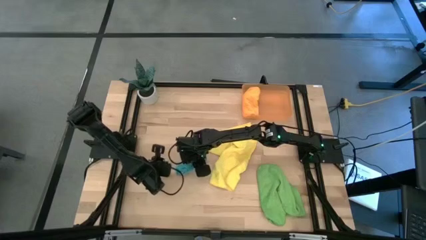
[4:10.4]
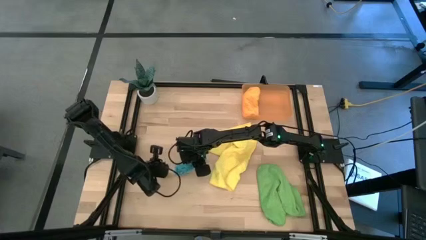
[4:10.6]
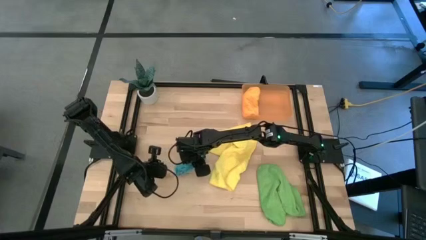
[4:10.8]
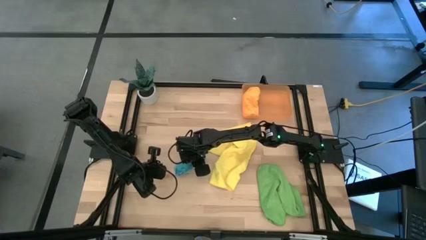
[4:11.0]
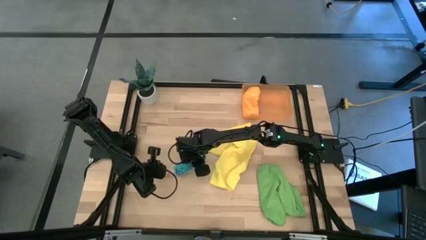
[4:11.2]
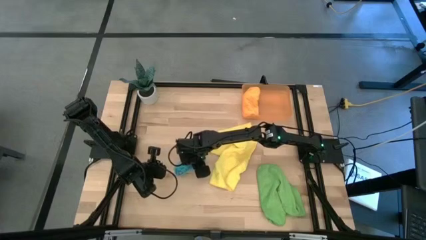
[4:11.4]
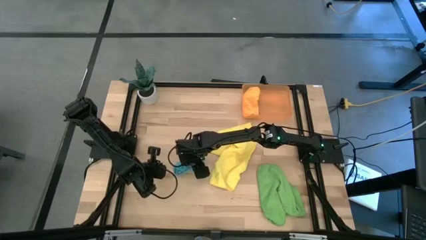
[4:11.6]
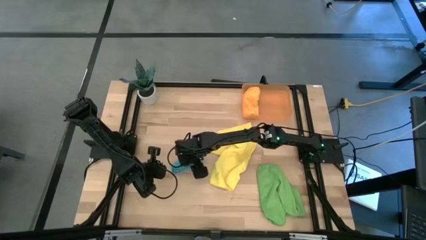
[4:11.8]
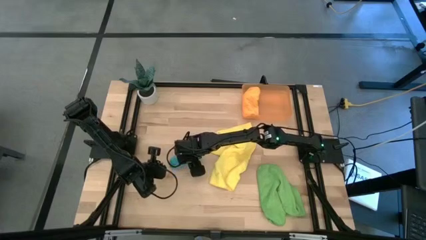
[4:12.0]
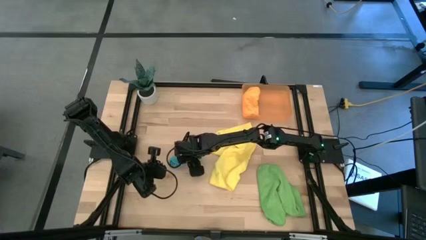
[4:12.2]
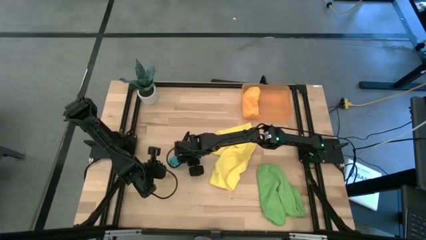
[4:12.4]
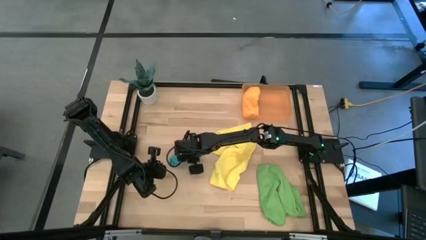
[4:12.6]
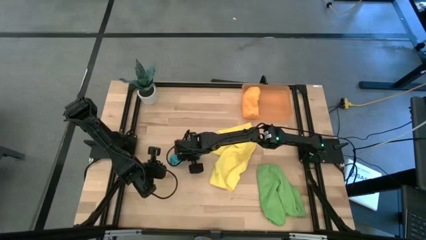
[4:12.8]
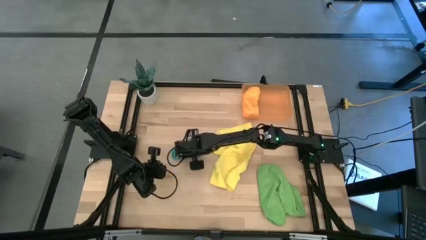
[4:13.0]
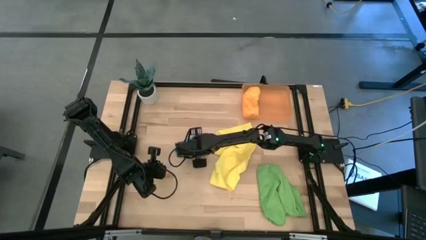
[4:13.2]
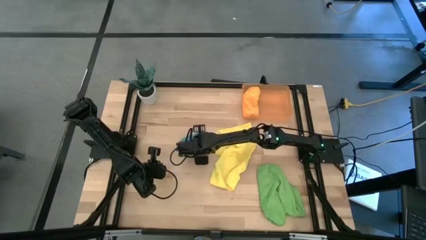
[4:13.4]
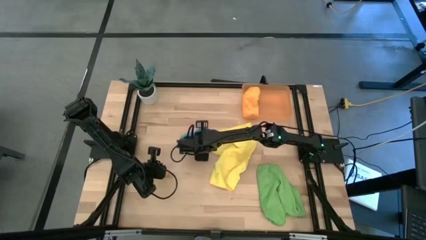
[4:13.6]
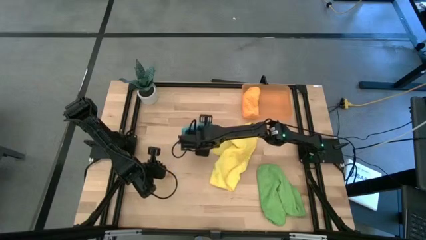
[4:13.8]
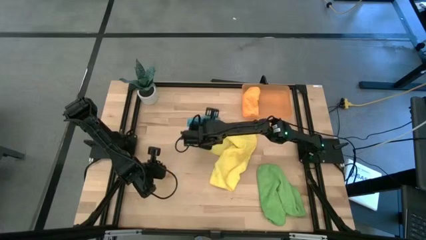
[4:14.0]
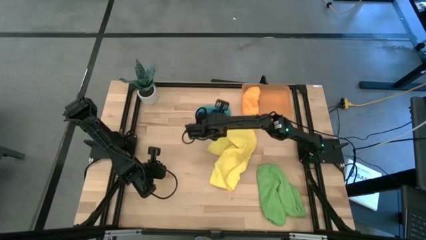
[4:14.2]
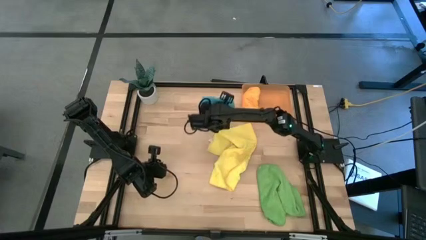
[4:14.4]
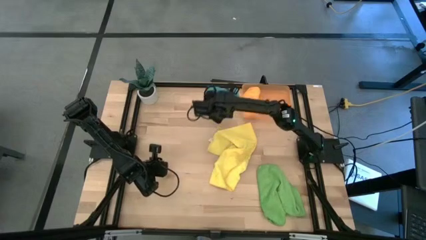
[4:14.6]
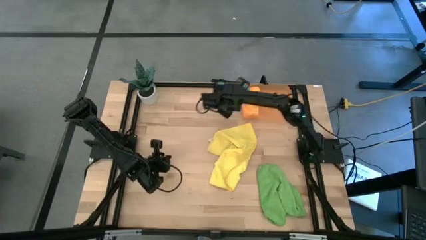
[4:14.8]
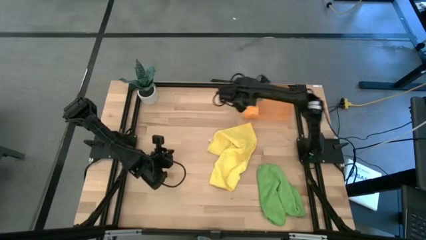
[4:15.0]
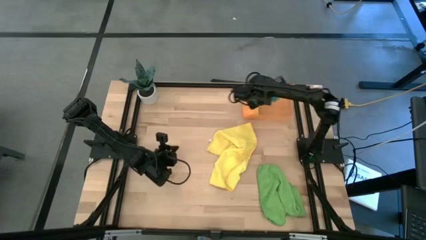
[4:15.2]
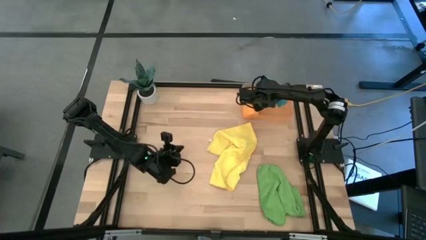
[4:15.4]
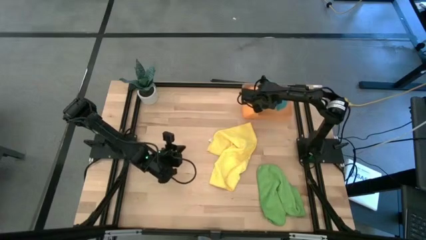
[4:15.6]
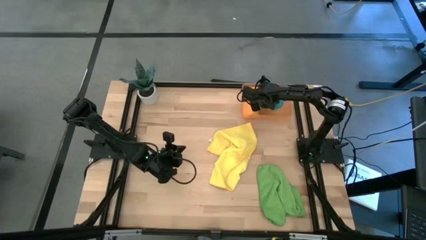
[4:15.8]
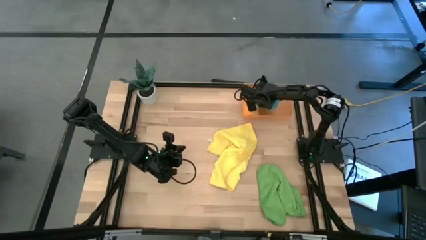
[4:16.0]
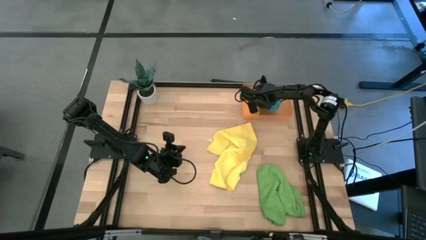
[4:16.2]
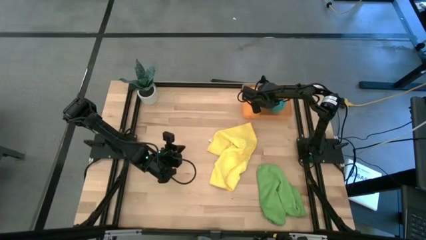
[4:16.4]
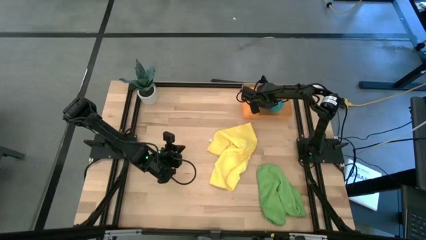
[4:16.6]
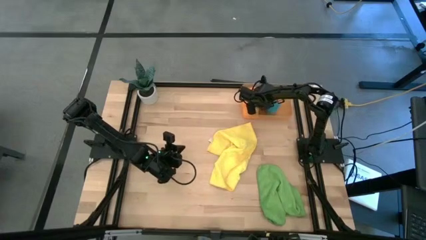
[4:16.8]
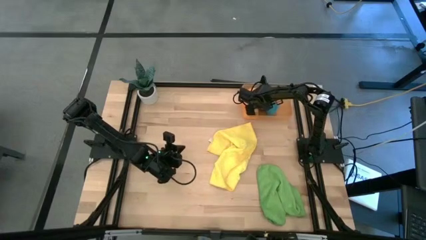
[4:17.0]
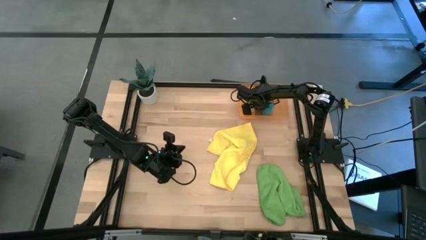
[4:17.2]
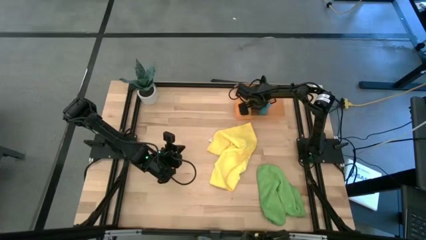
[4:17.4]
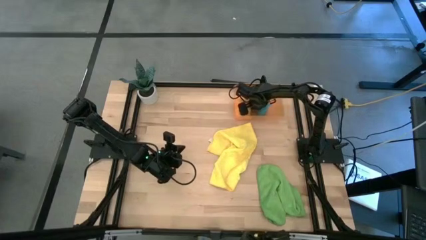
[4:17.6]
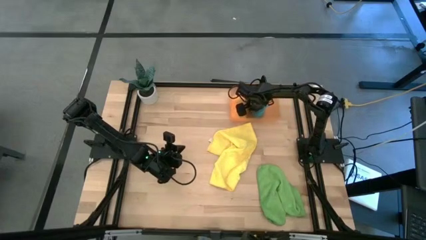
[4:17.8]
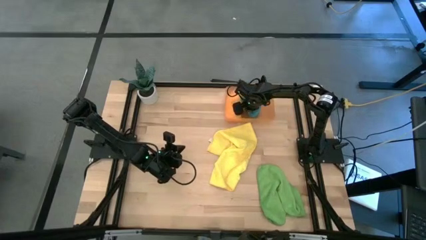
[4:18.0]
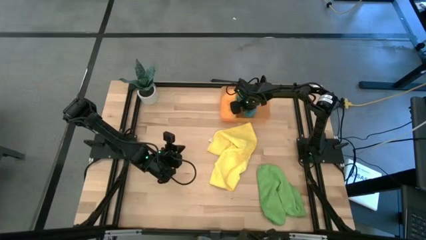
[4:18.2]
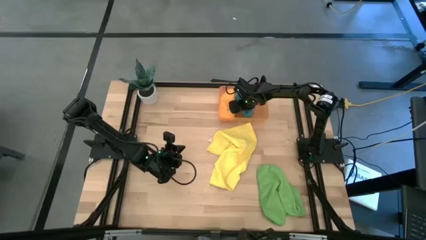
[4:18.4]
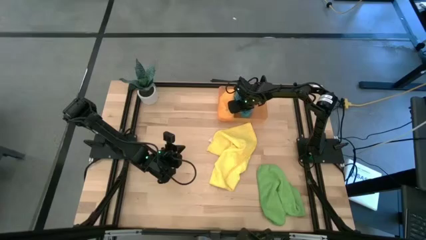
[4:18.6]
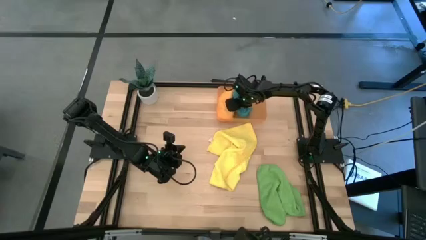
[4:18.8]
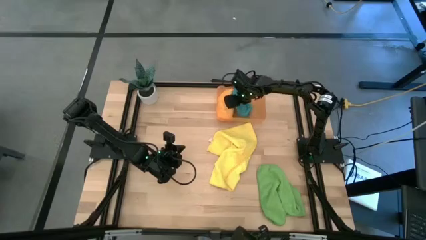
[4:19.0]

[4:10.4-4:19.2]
Task: Roll microfiber towels into tight, uniform cylinder then place into a basket
Put the blue microfiber towel into the bin

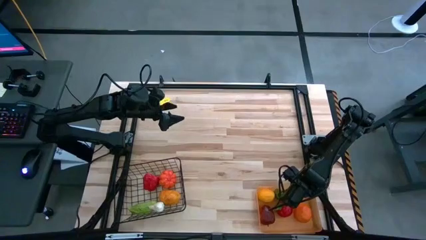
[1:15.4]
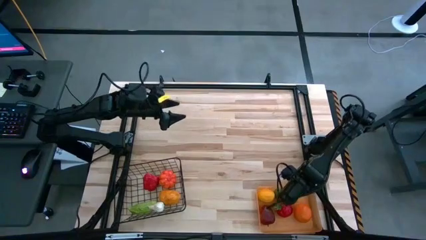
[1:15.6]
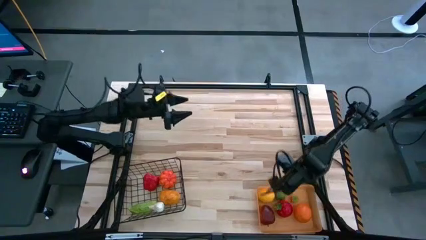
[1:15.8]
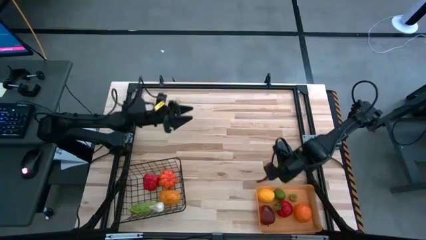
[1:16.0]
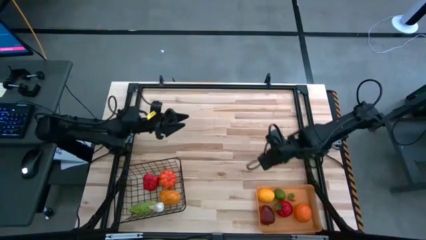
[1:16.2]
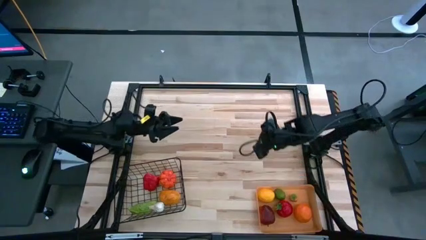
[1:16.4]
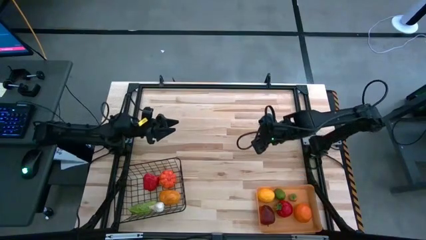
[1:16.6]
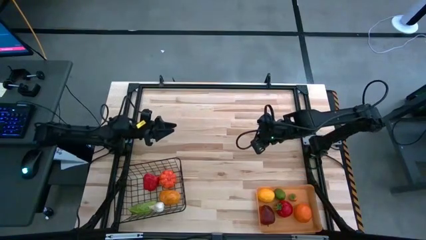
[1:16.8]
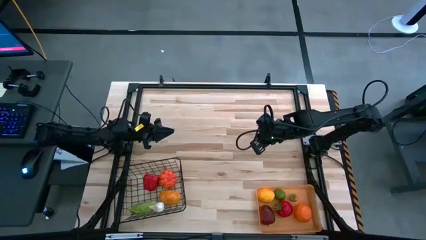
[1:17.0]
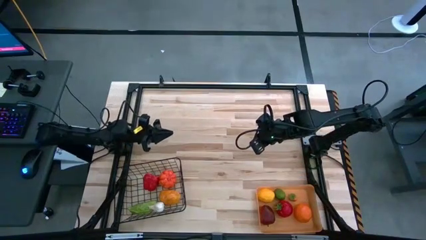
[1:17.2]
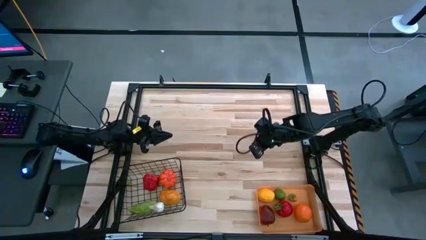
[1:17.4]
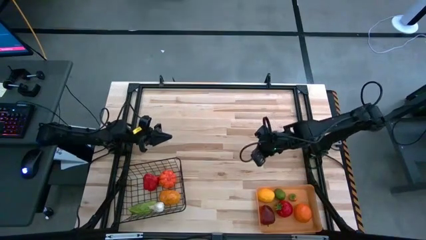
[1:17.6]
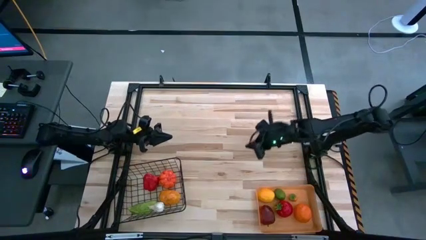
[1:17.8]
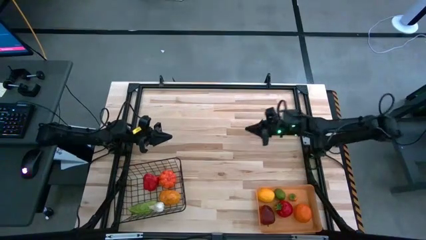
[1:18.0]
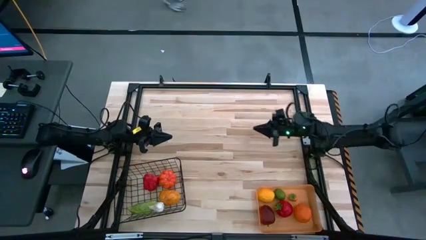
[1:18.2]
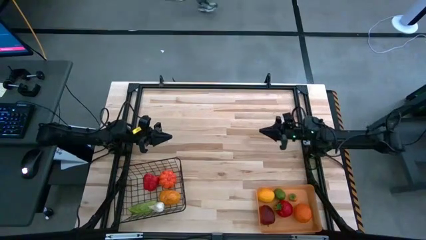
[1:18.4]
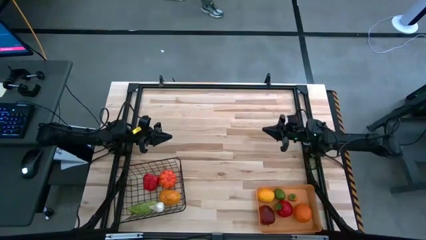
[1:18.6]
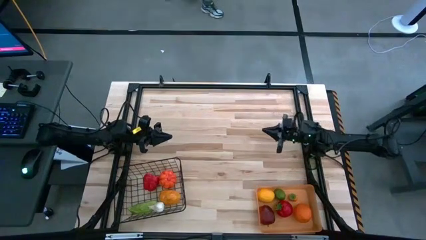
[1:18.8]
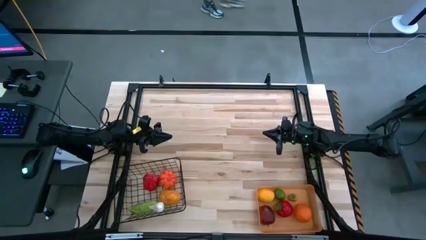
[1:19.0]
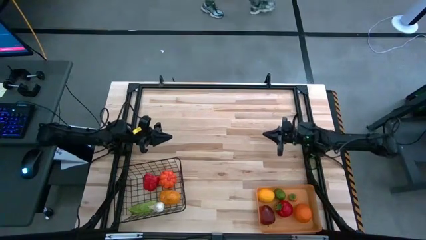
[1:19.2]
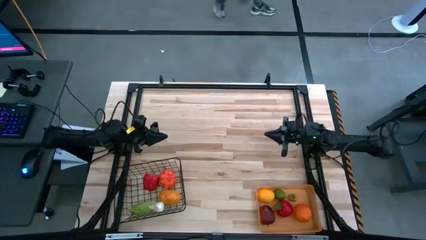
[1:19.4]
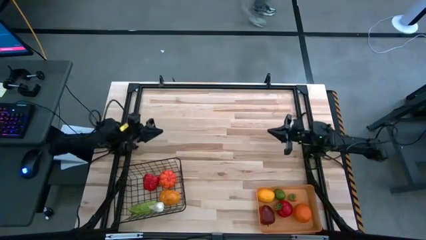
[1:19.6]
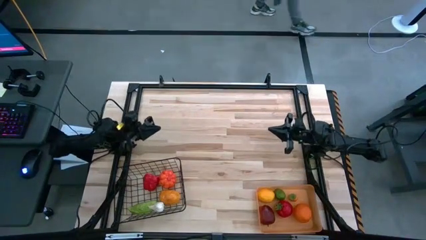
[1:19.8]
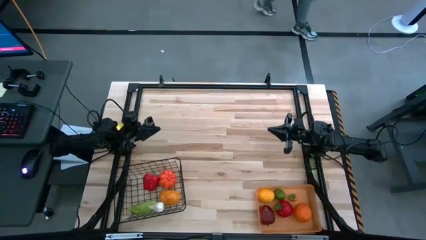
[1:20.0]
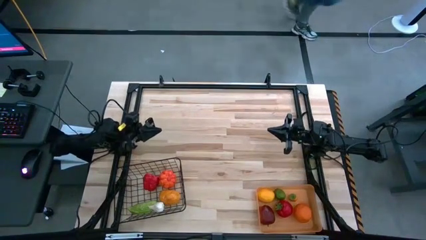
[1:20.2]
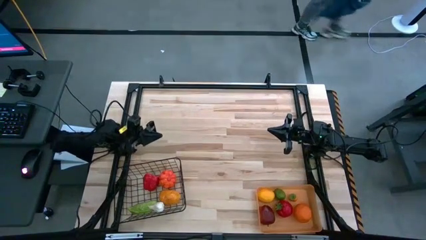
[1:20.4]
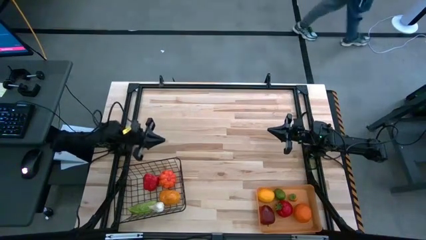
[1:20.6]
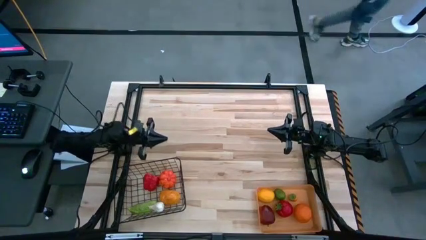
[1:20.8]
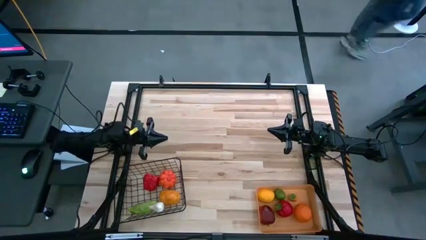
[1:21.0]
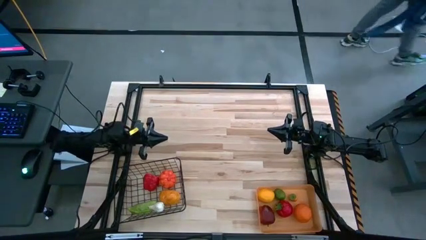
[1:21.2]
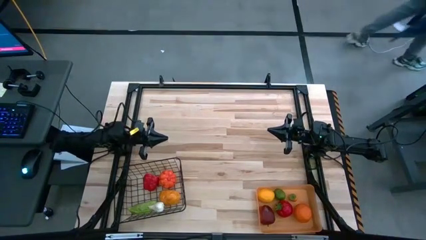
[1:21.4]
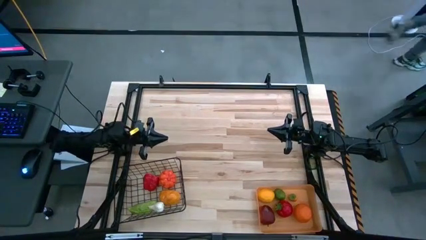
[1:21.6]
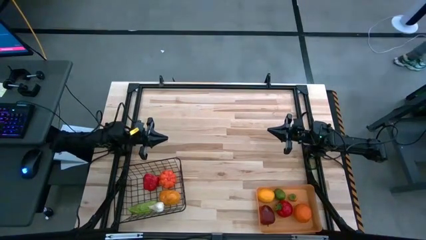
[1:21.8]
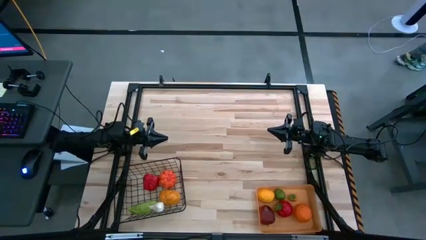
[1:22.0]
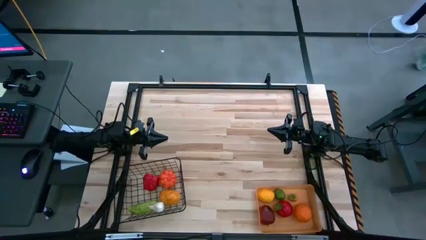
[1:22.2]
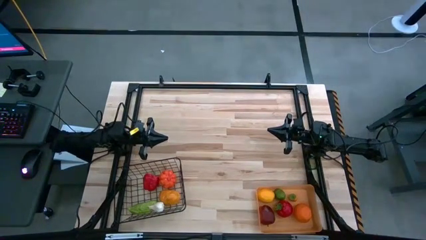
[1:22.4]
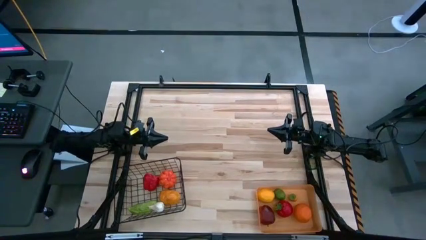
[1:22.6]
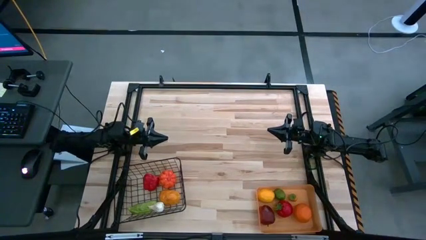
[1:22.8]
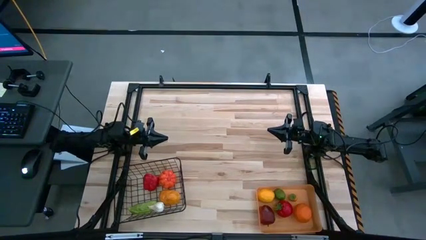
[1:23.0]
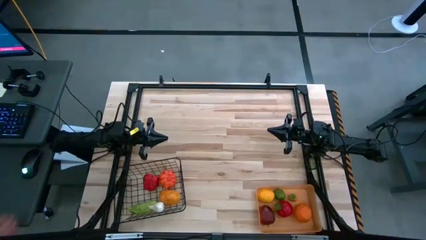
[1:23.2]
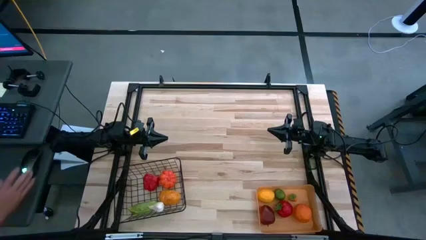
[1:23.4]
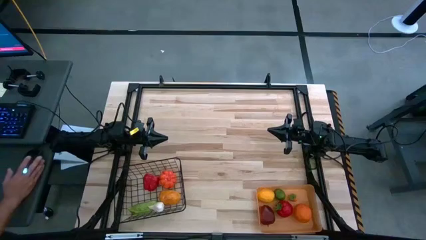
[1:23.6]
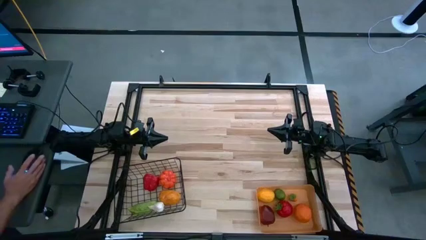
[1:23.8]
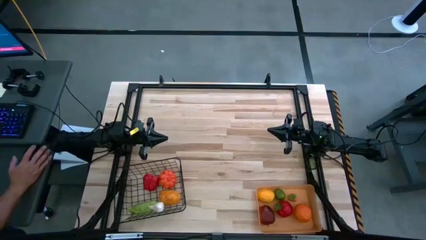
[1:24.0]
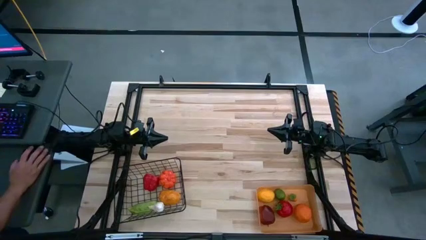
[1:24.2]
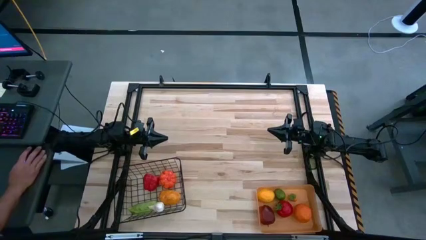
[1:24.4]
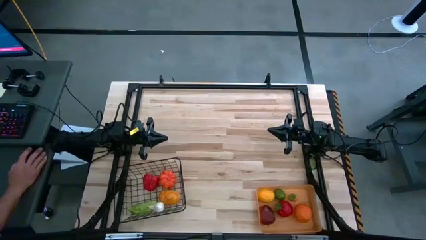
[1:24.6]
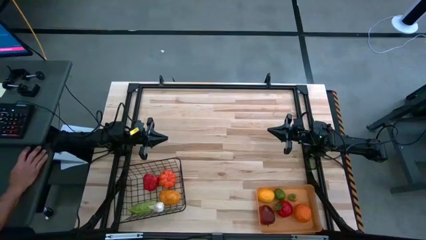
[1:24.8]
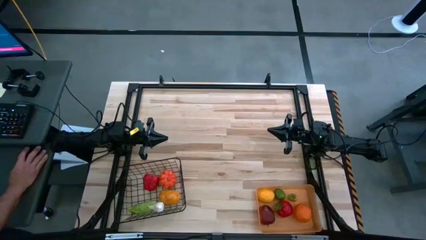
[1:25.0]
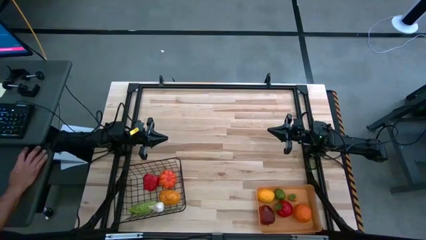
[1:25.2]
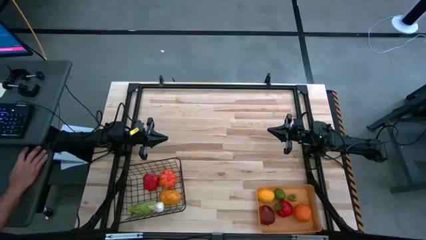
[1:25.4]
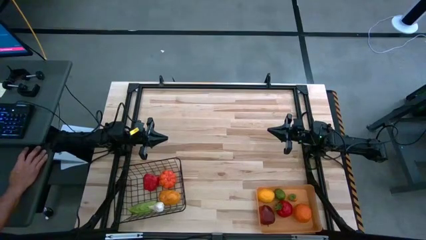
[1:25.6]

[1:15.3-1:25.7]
Task: Sort produce into baskets
Return to Home Position
